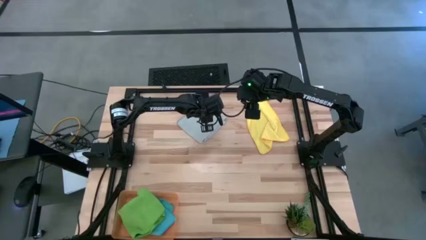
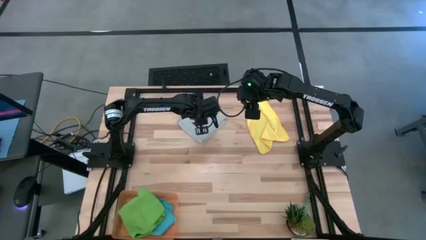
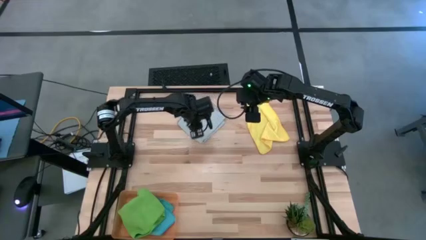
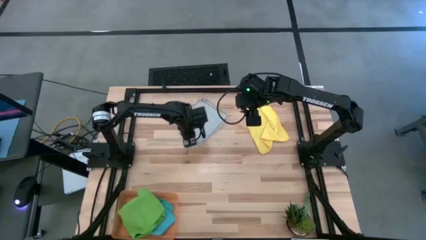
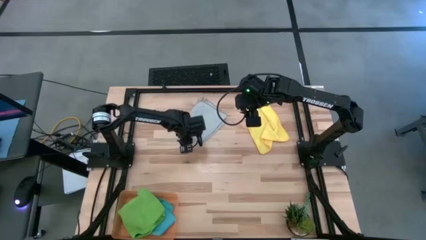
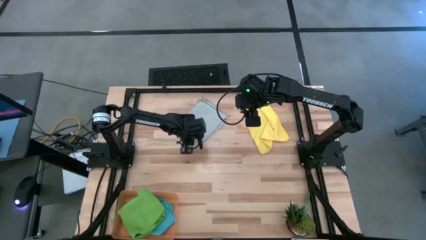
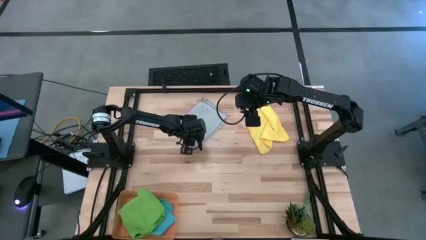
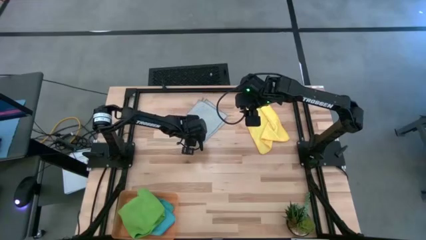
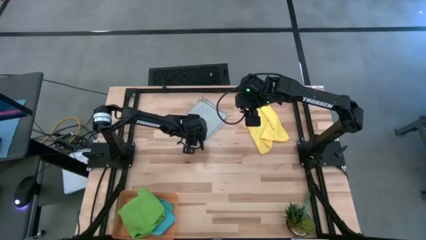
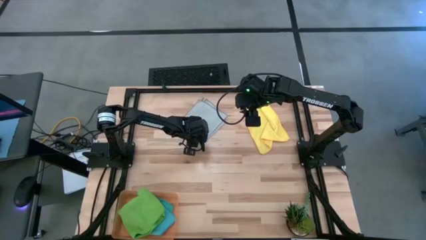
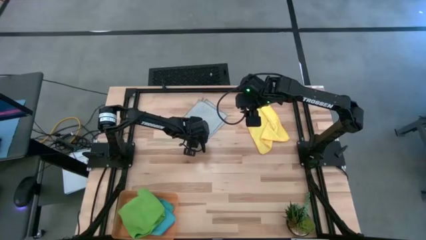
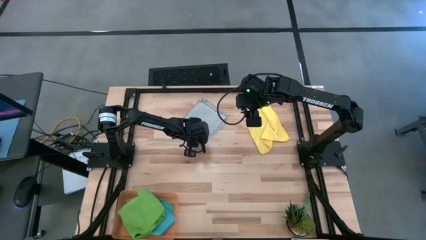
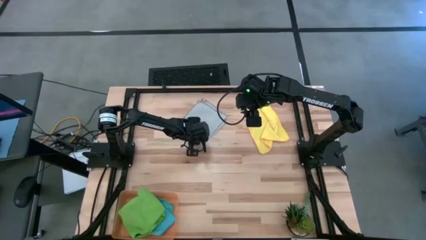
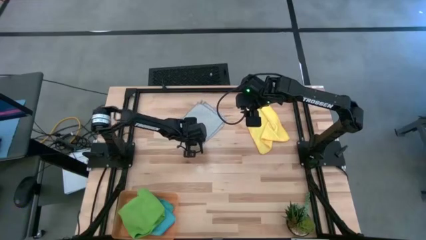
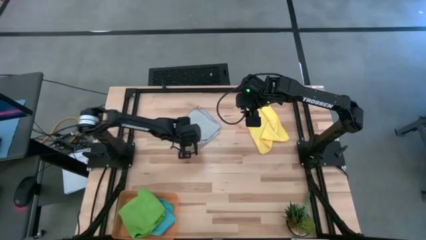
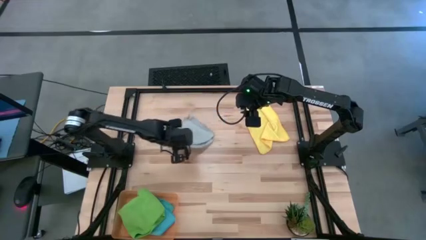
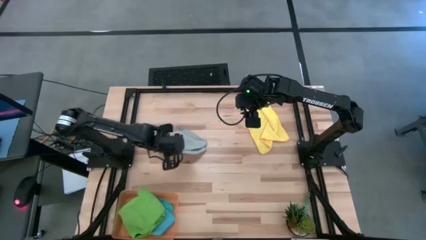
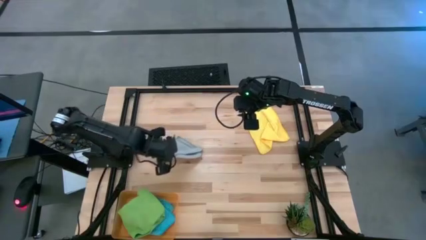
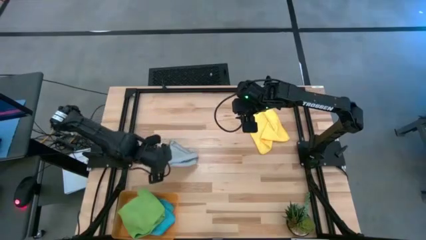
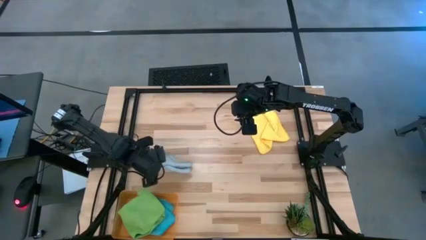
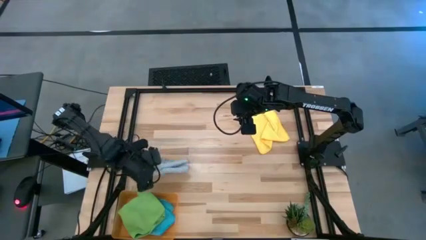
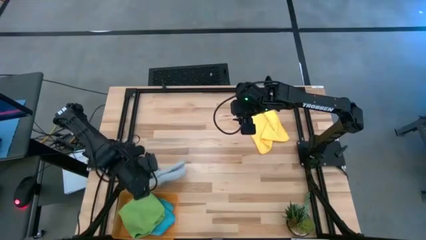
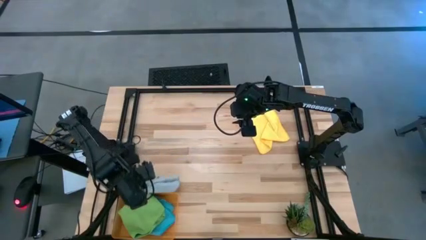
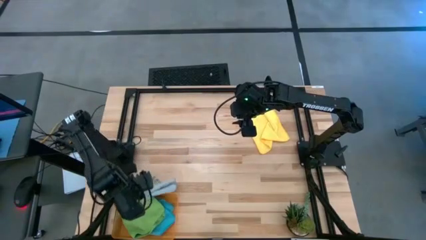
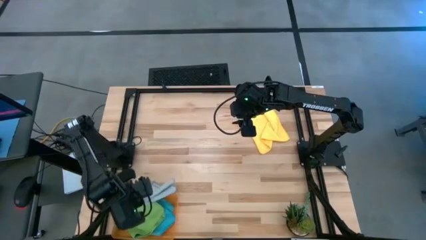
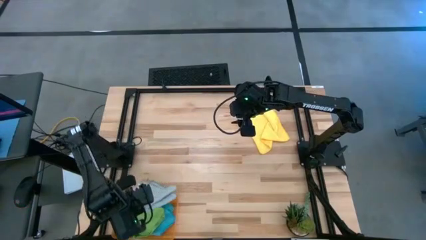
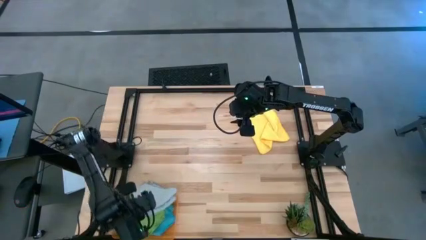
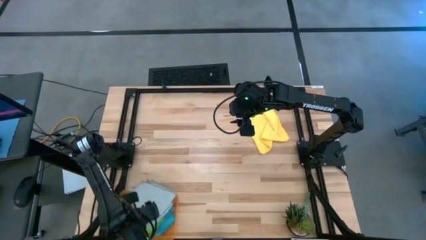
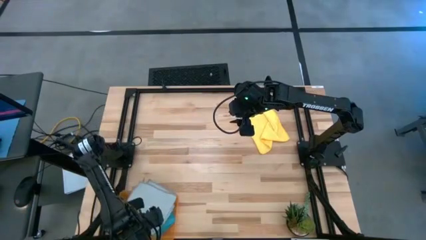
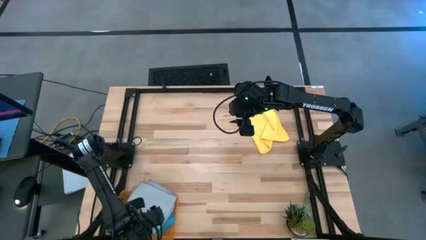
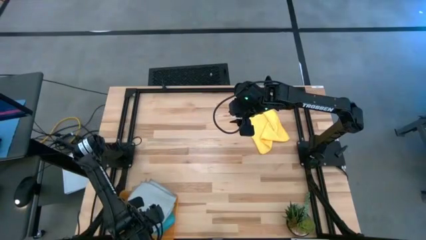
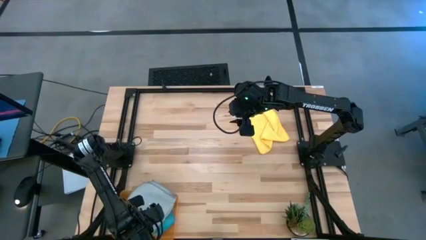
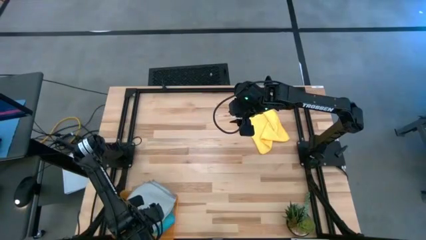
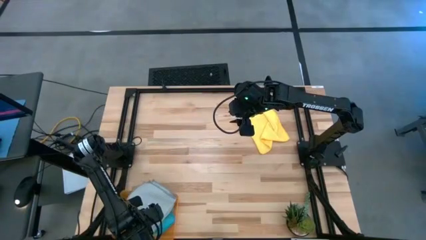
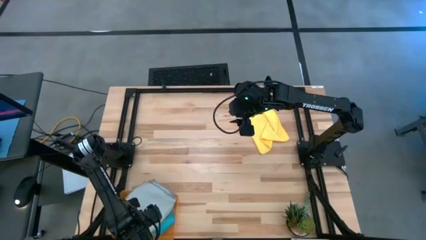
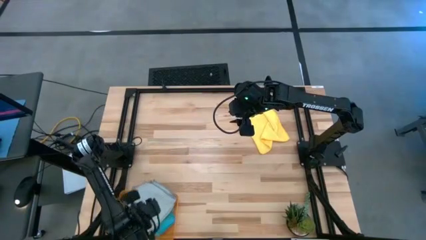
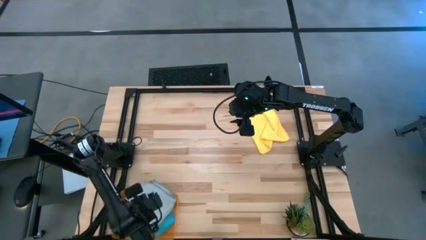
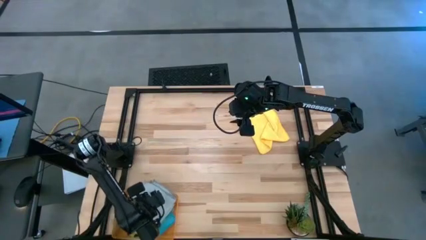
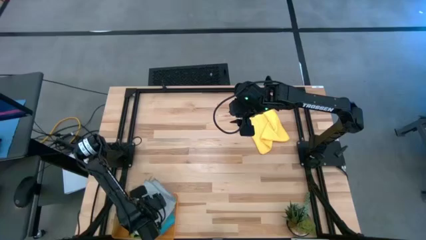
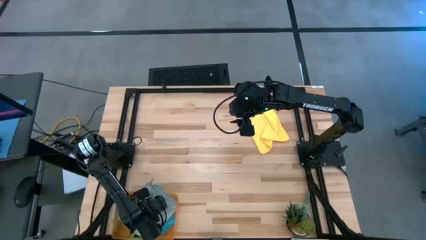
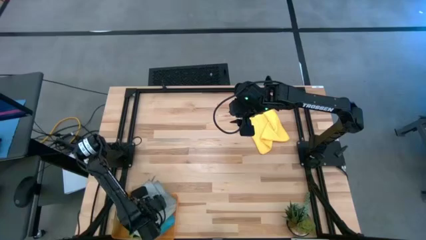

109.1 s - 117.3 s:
Task: Fold microfiber towels
Put the gray towel into the orange bin

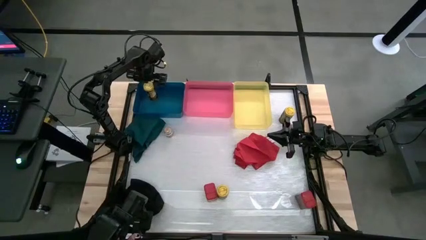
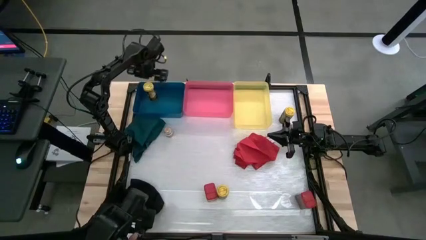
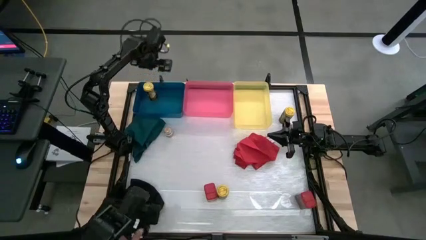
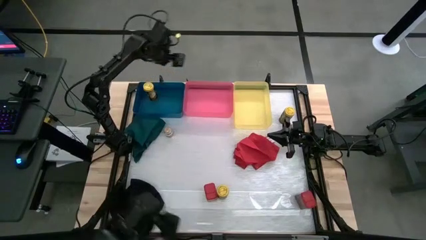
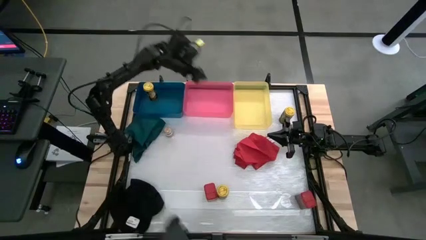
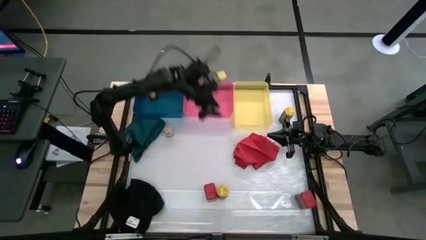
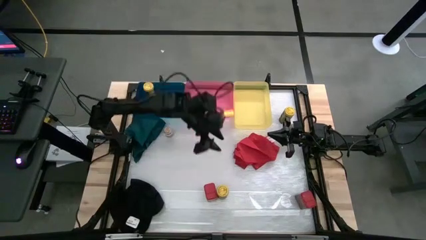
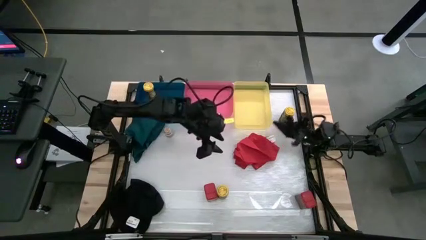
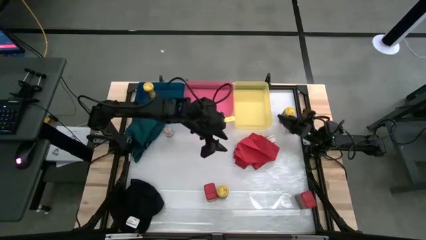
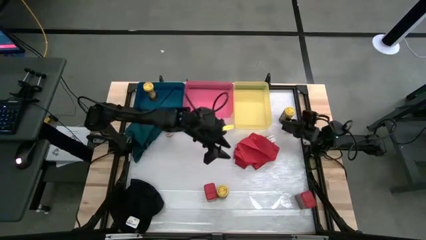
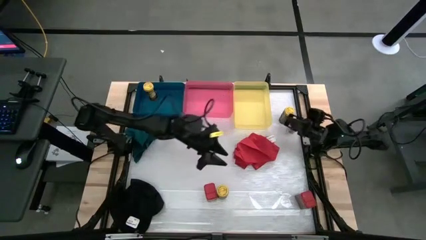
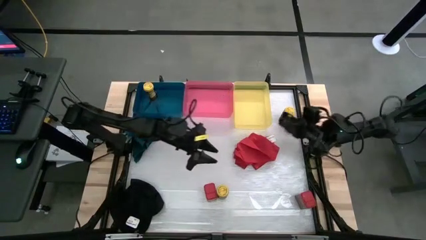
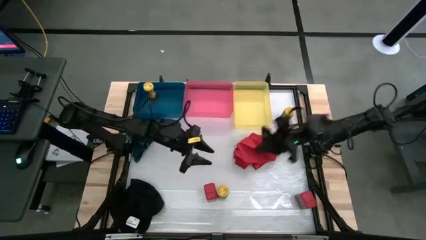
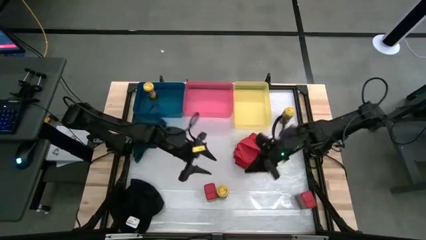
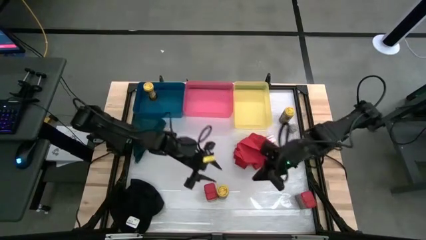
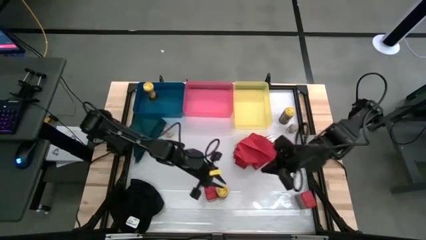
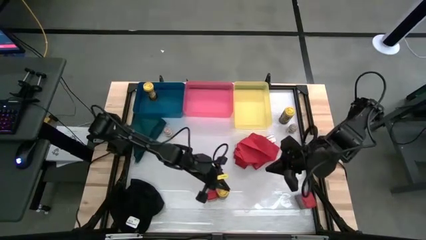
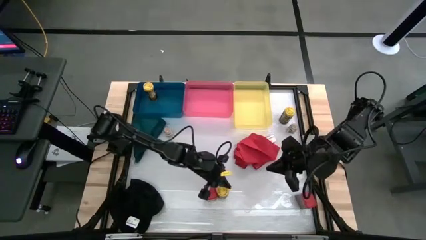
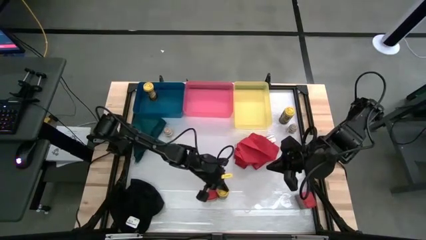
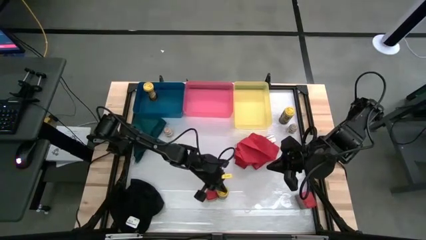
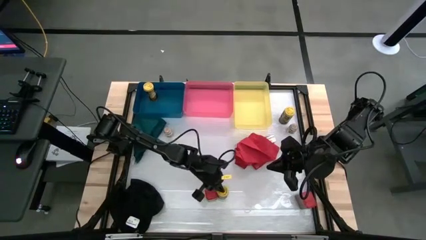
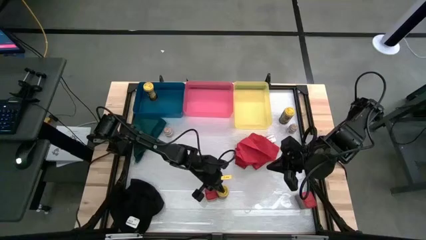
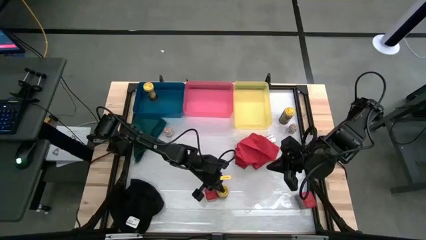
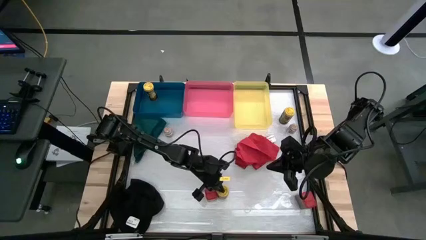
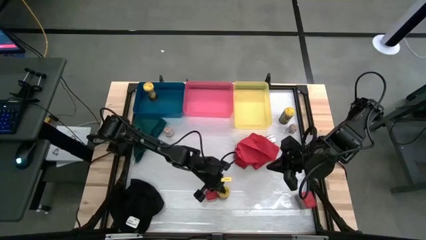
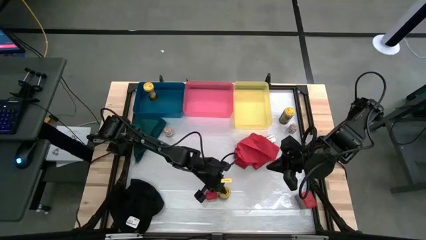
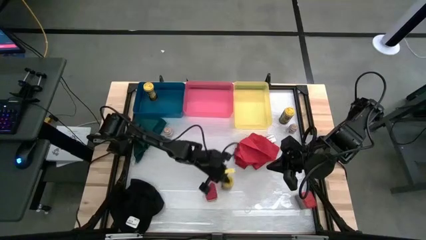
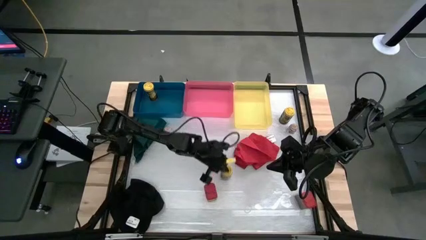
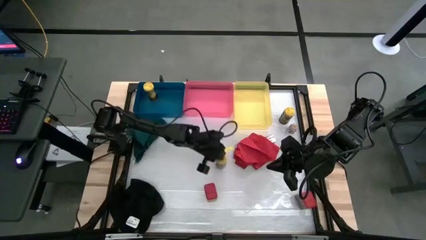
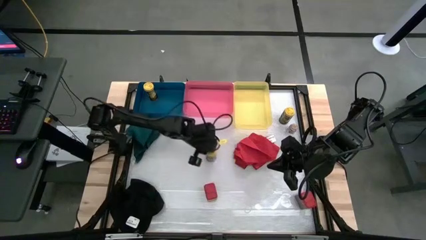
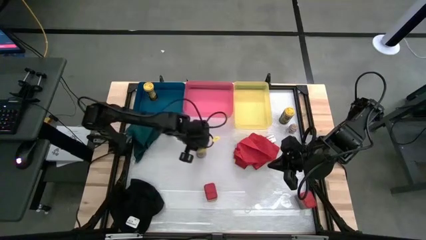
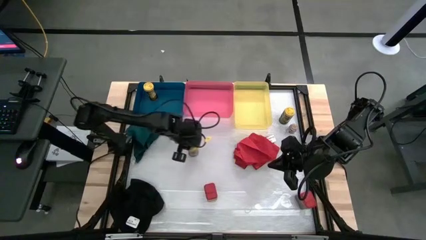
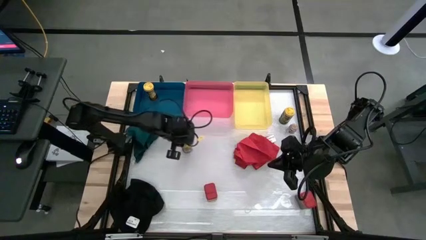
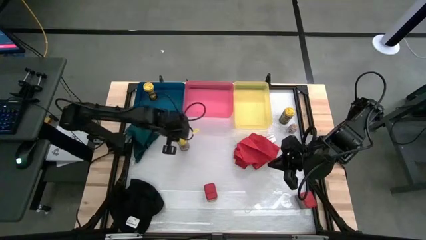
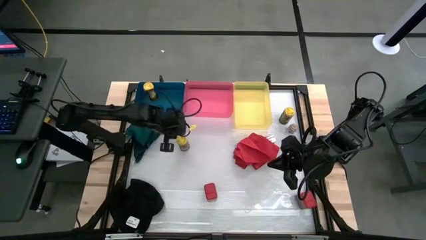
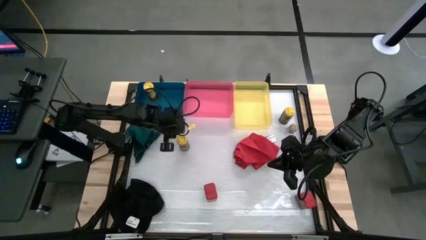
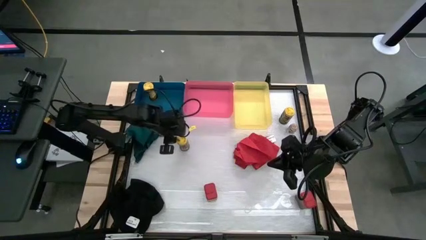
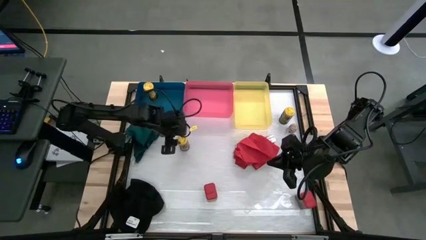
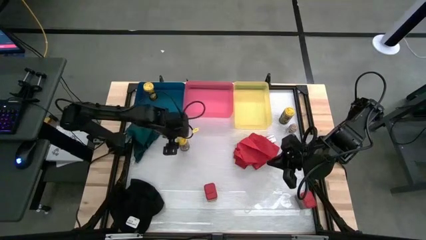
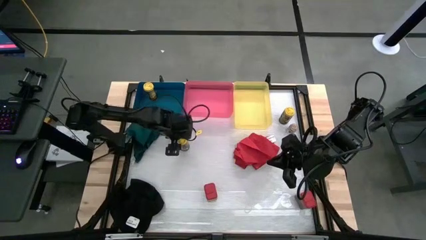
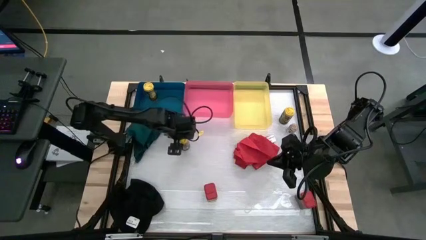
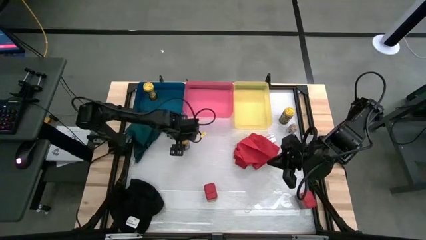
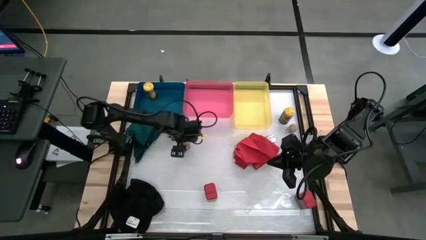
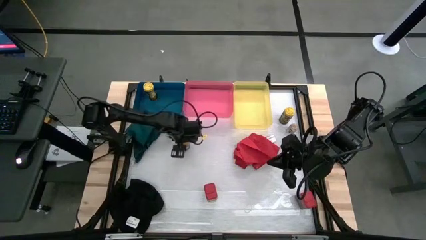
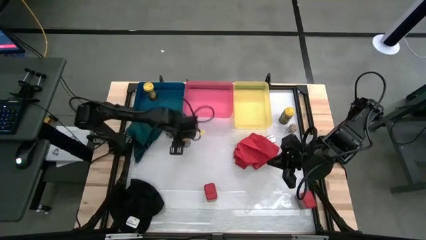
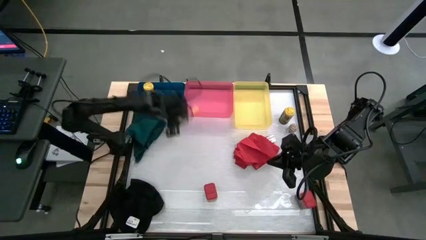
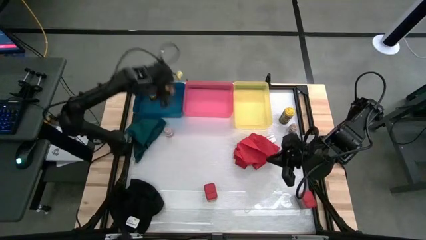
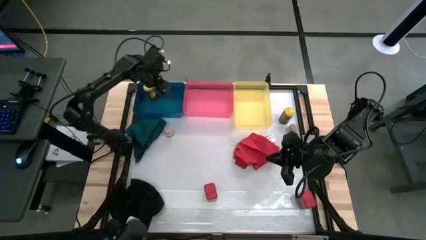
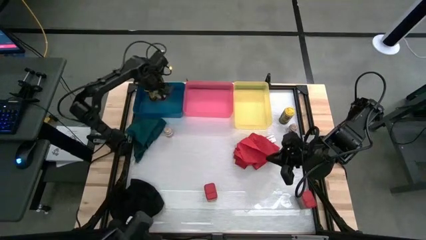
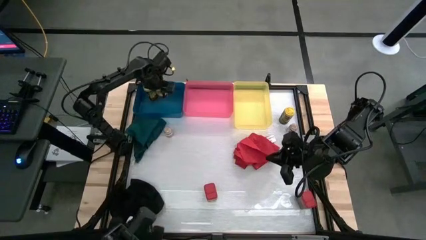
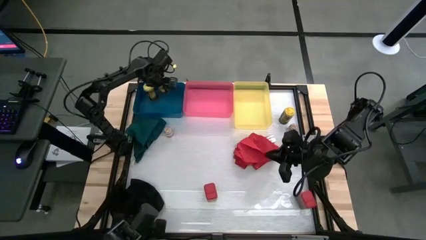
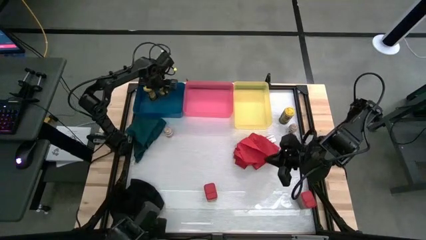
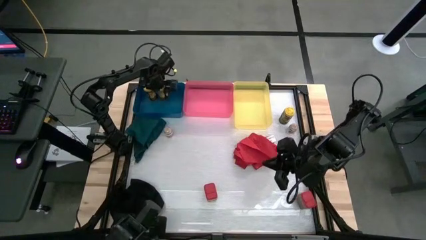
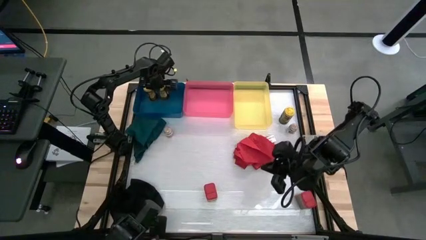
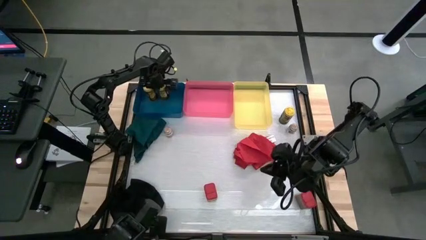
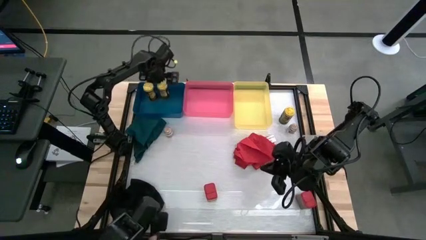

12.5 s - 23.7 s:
Task: Sort spices by type
Put the bottom yellow seasoning bottle into the blue bin
